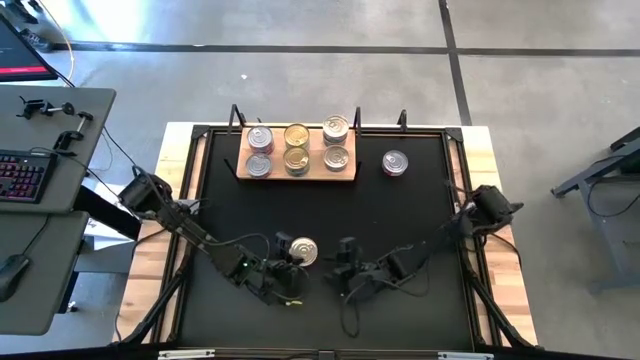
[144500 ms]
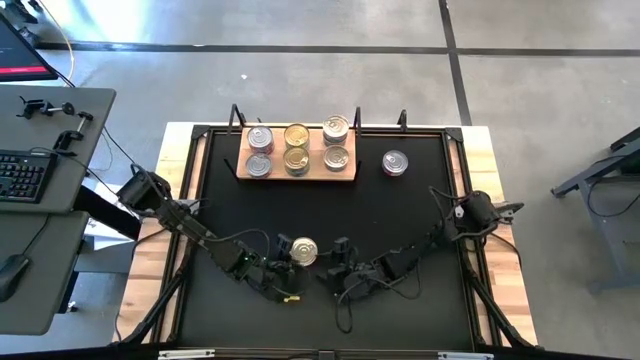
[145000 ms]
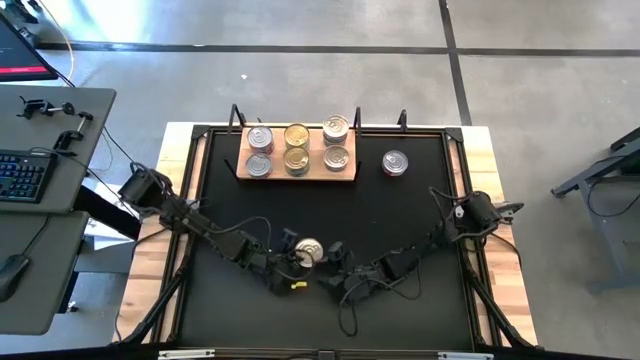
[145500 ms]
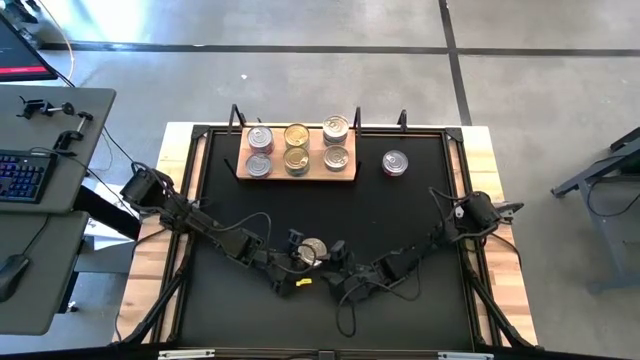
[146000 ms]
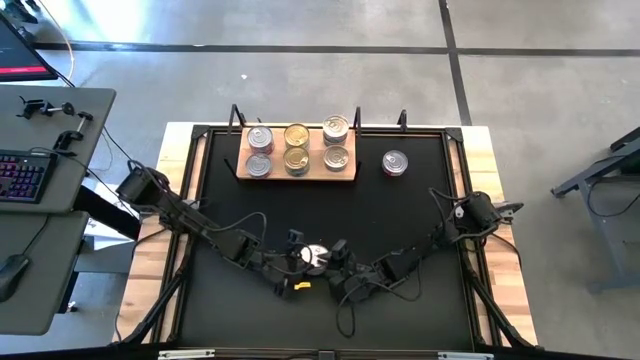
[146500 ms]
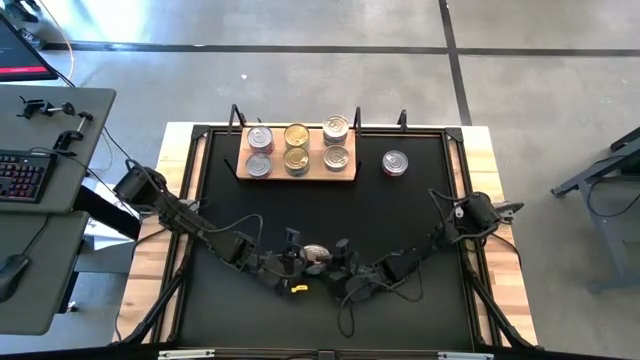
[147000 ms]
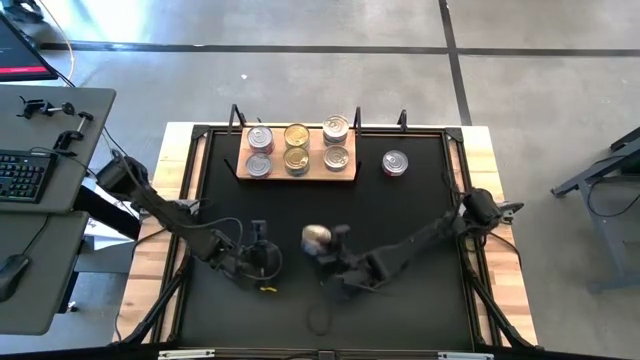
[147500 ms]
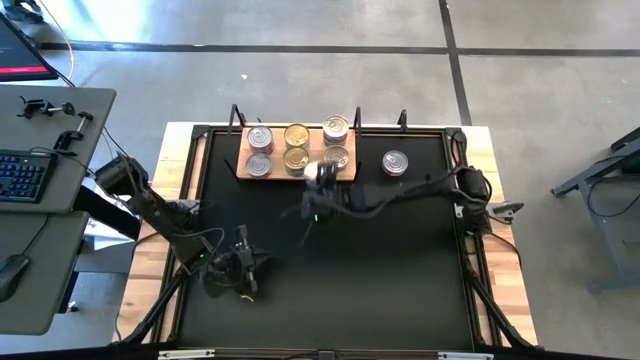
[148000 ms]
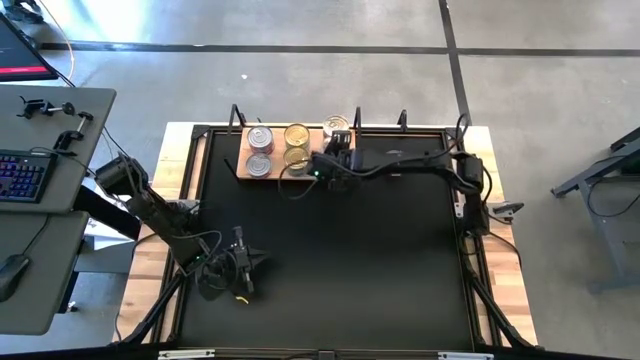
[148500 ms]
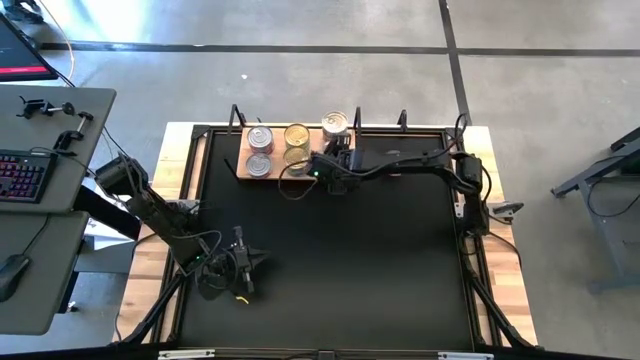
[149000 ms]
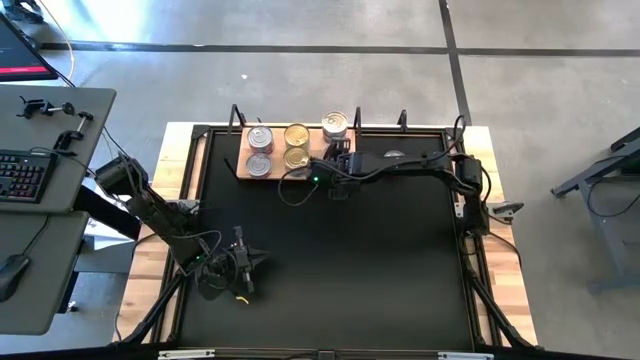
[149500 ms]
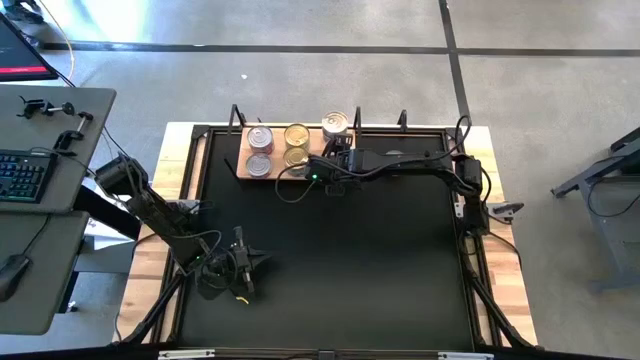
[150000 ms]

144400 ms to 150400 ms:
Task: Stack canned seafood by type on shelf
Stack the blue pink tuna can on top of the blue pink tuna can on the shelf

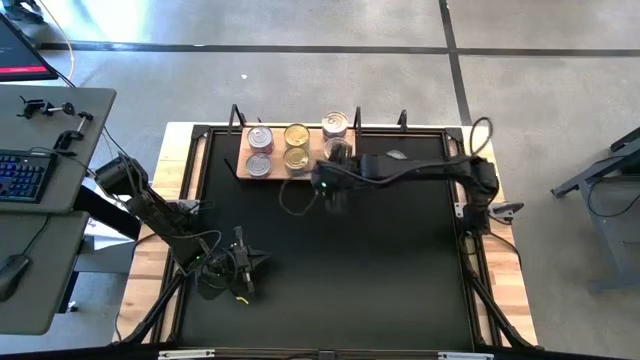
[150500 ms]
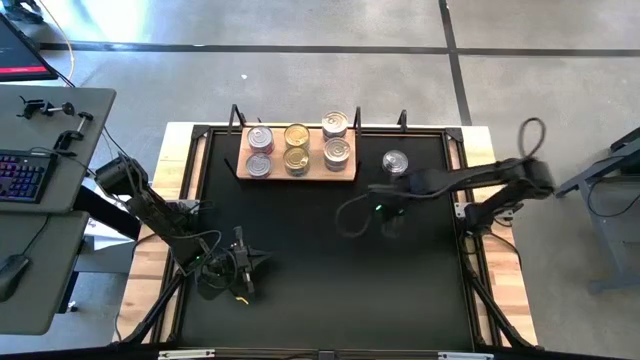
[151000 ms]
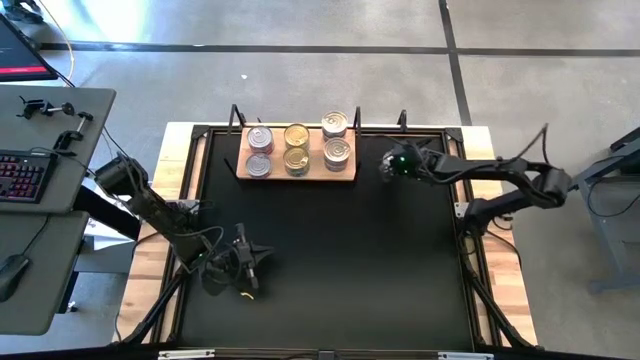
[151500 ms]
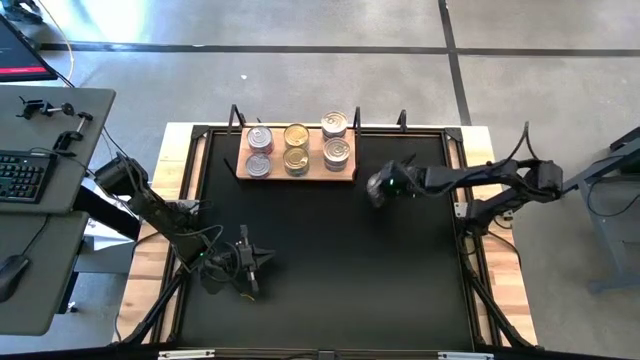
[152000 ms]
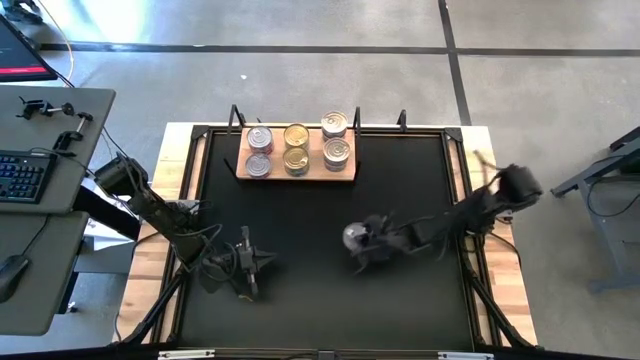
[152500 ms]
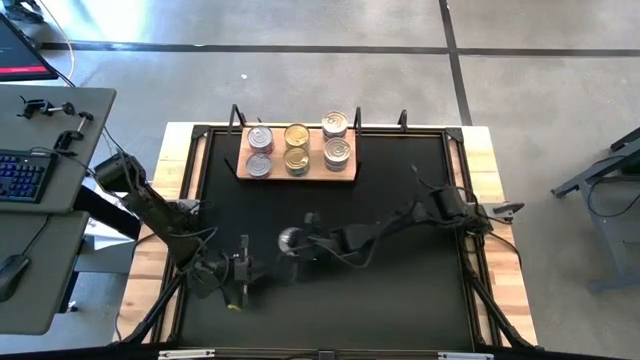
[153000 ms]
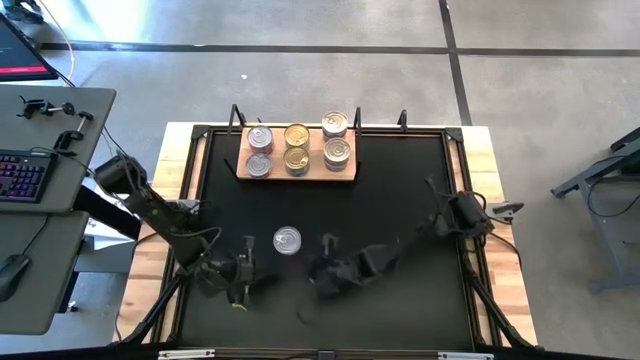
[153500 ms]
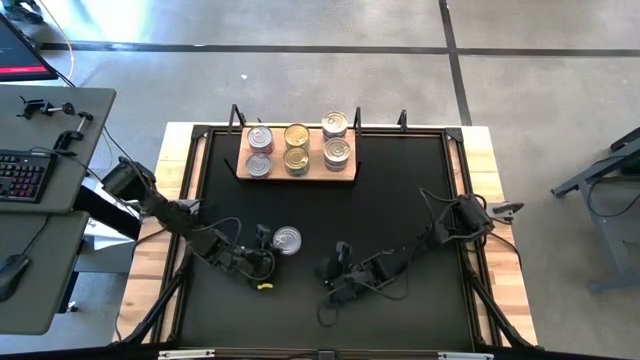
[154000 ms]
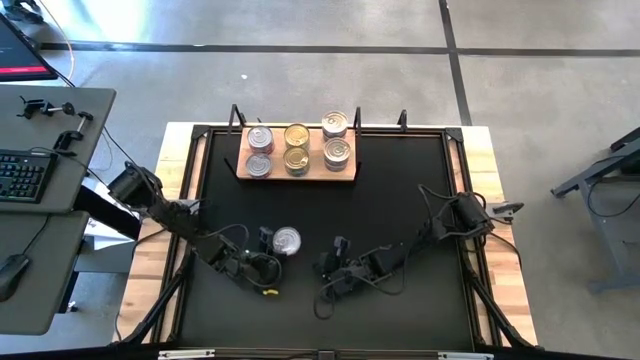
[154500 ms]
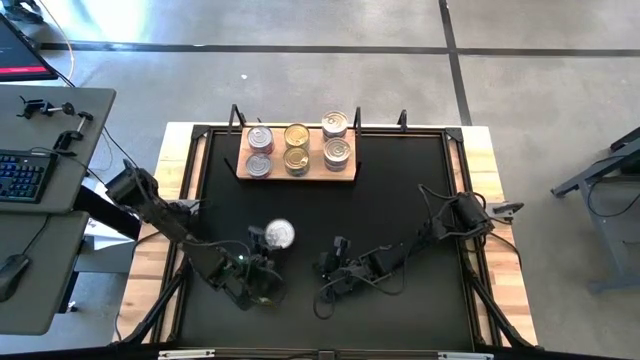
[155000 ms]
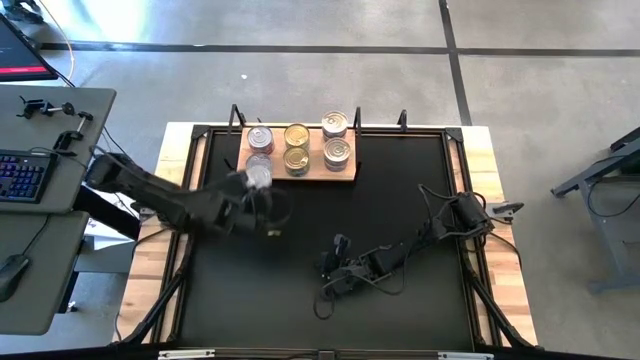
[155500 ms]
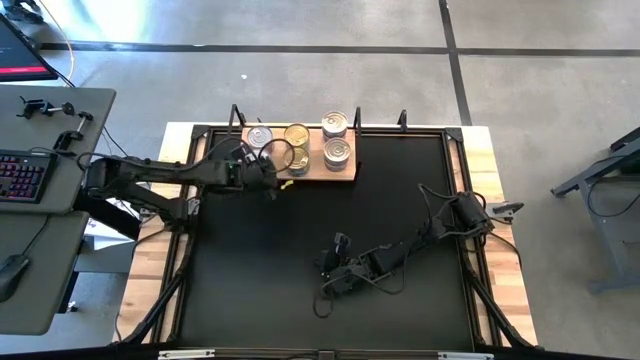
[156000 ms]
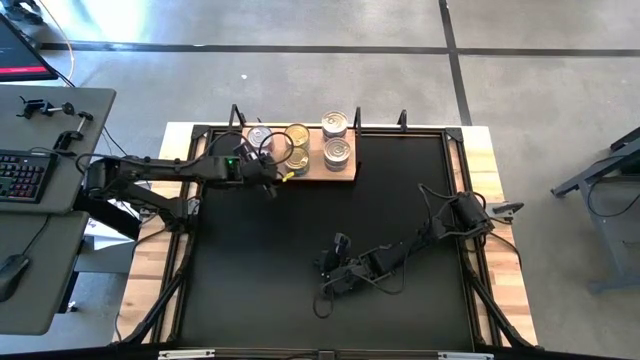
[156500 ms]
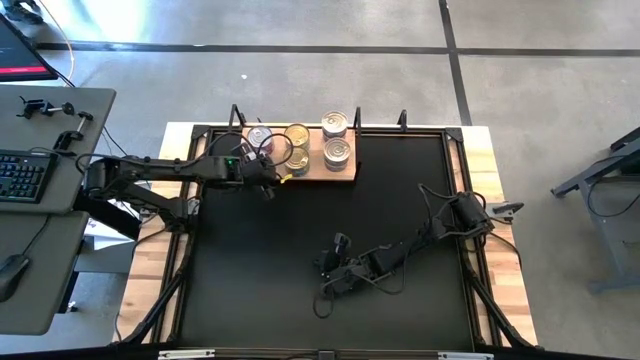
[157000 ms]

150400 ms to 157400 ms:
Stack the red tuna can on top of the red tuna can on the shelf

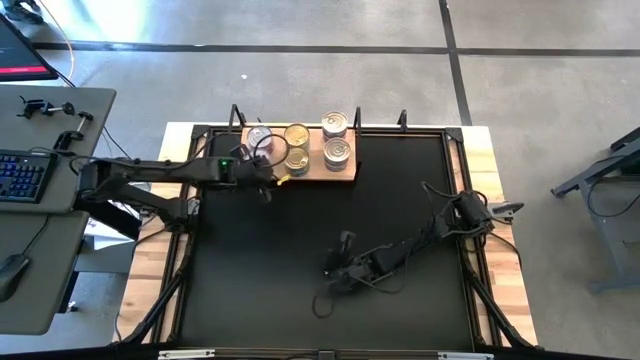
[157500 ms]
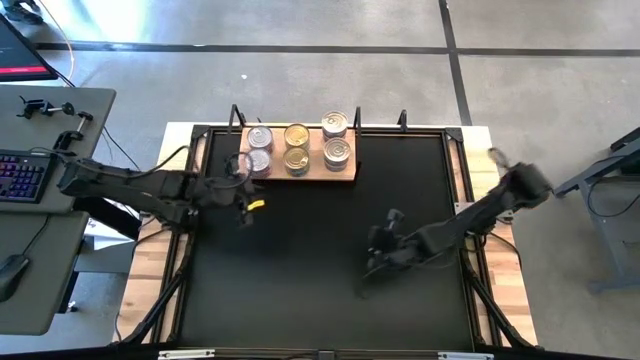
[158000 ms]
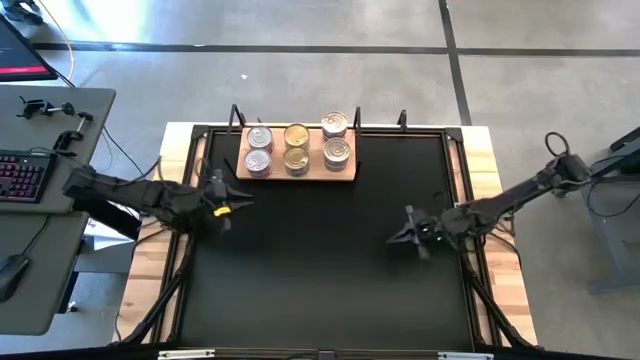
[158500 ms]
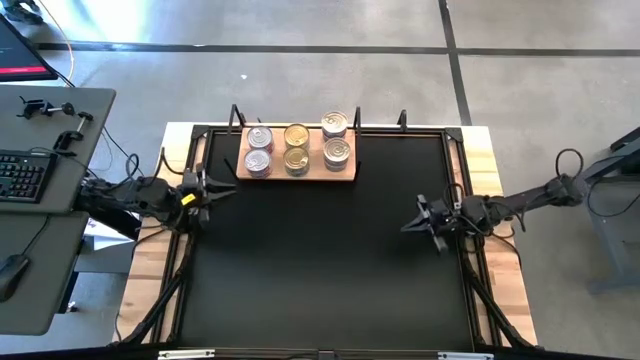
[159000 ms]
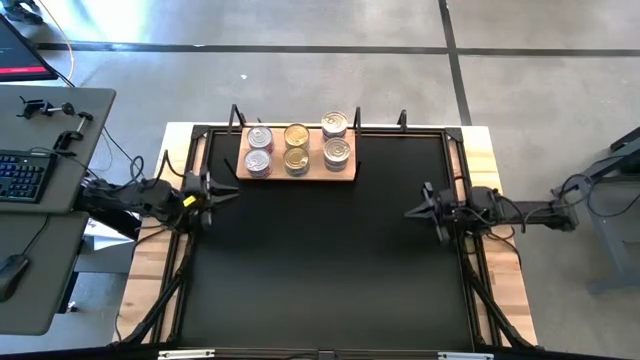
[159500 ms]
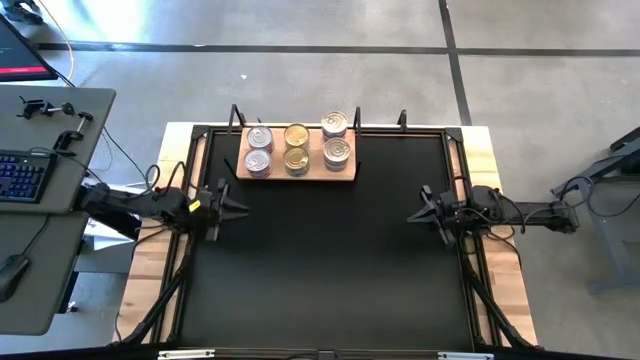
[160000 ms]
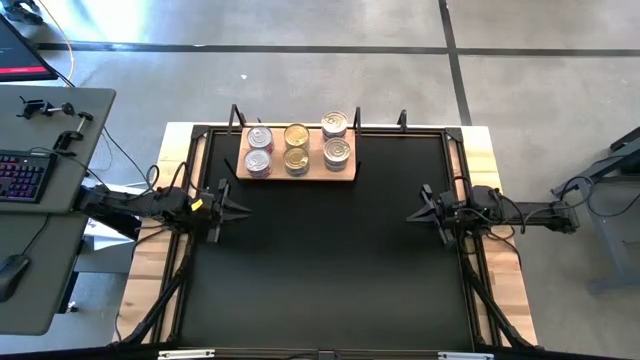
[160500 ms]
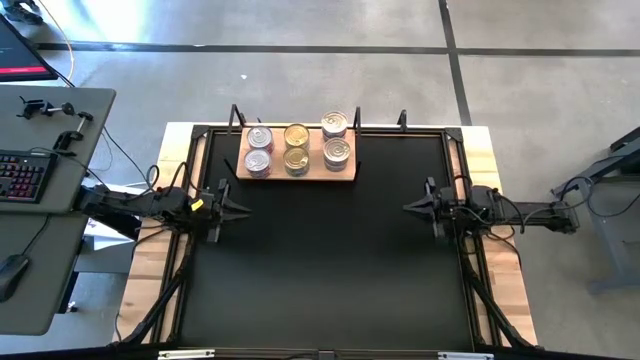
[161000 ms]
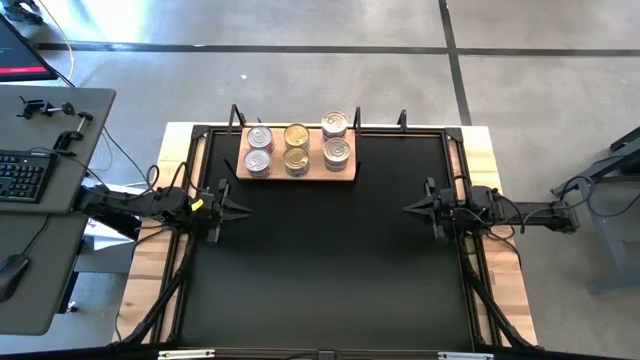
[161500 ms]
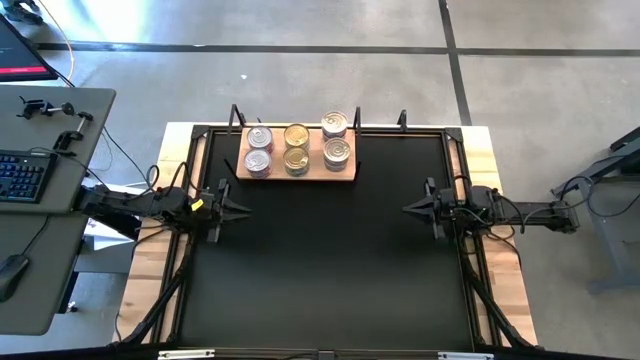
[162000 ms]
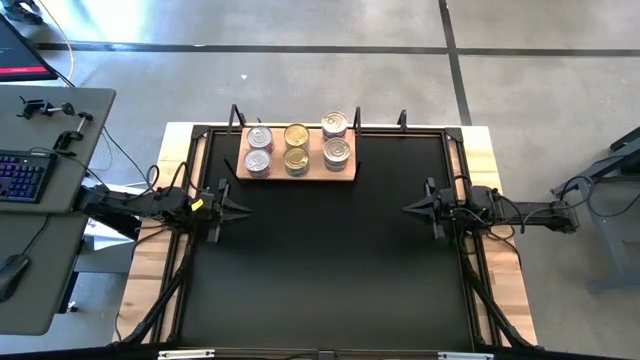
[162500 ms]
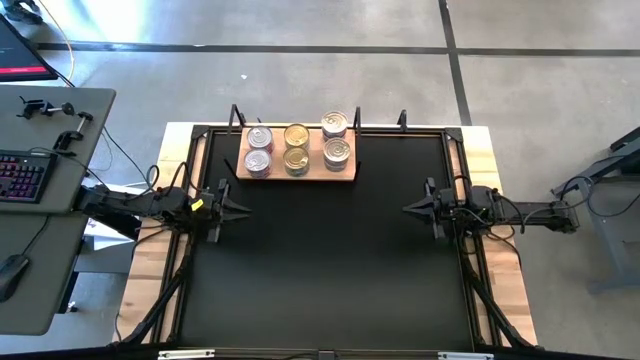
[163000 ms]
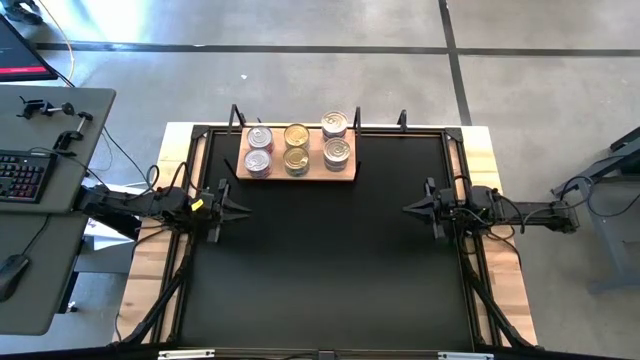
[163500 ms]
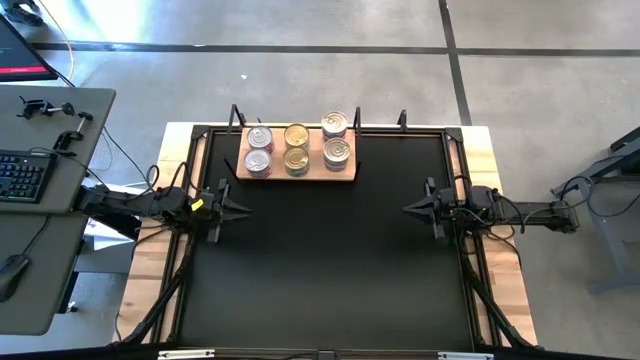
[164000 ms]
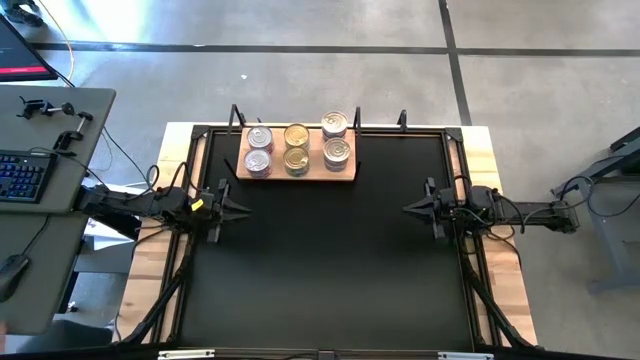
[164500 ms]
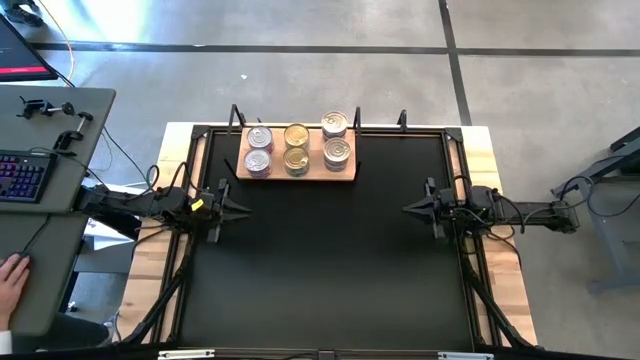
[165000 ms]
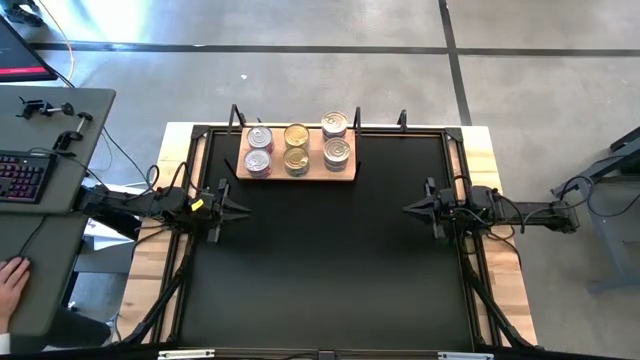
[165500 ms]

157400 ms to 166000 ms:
Return to Home Position

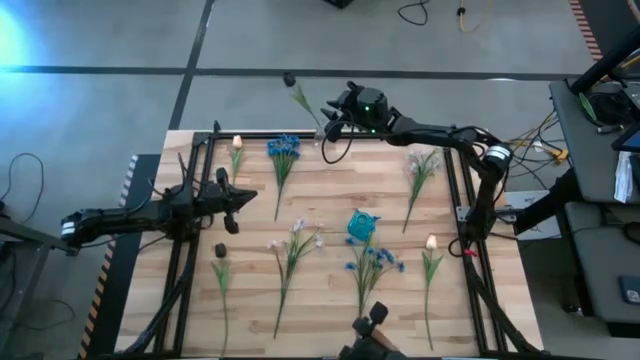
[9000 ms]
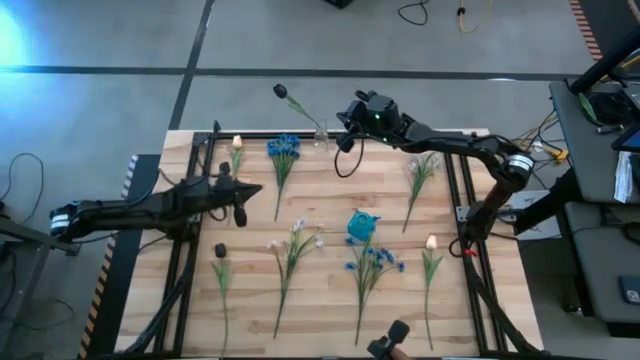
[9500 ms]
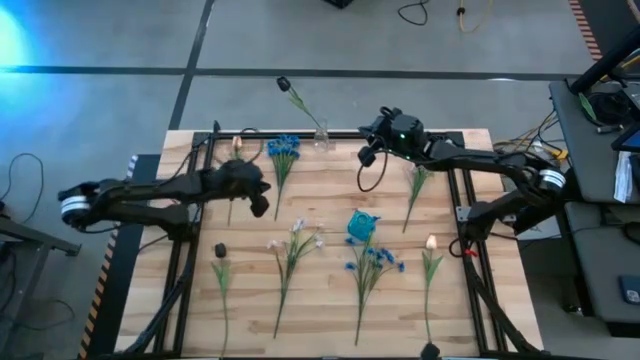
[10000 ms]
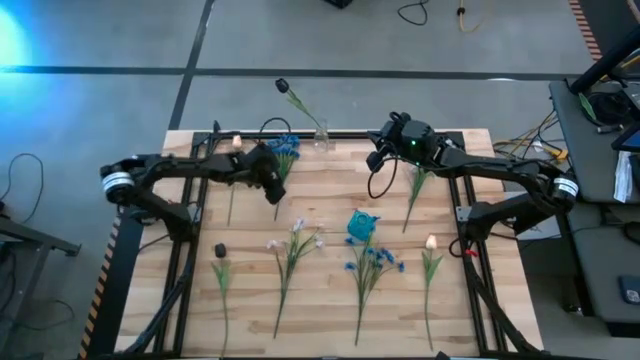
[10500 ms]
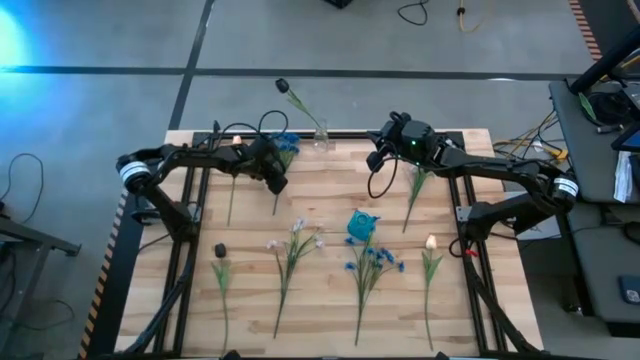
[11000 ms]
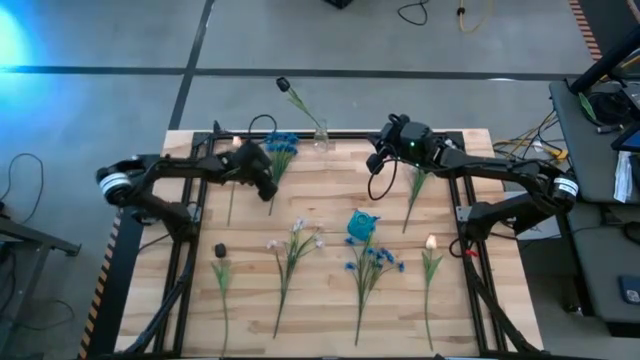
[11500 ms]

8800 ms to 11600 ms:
Task: Sort flowers into vase by color
Put the top blue flower into the transparent vase
